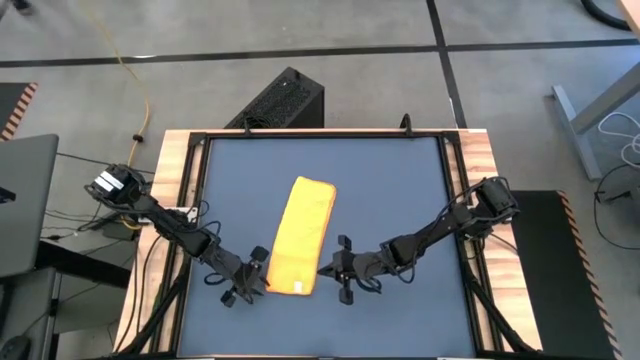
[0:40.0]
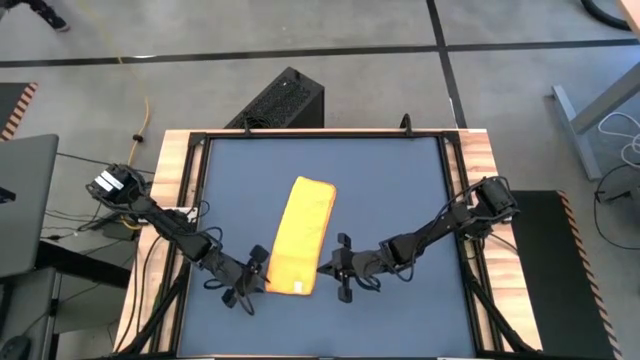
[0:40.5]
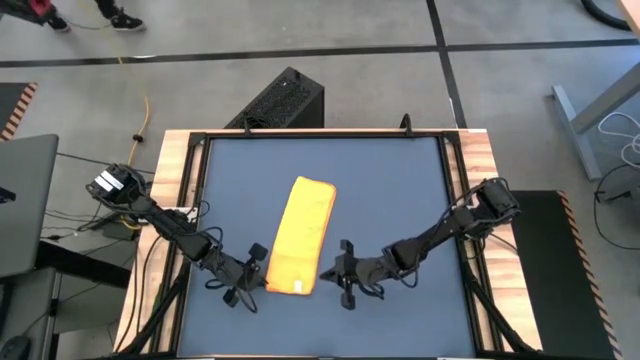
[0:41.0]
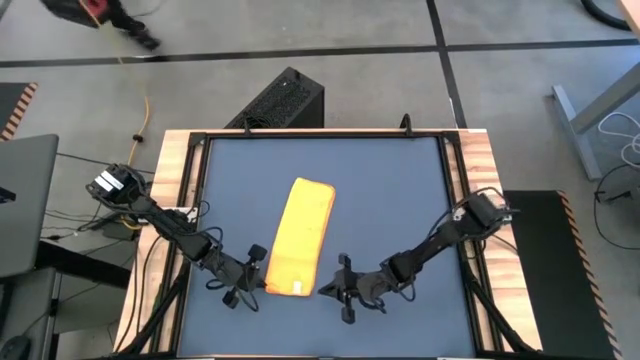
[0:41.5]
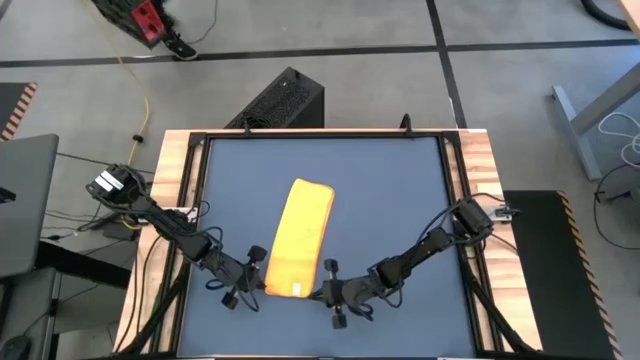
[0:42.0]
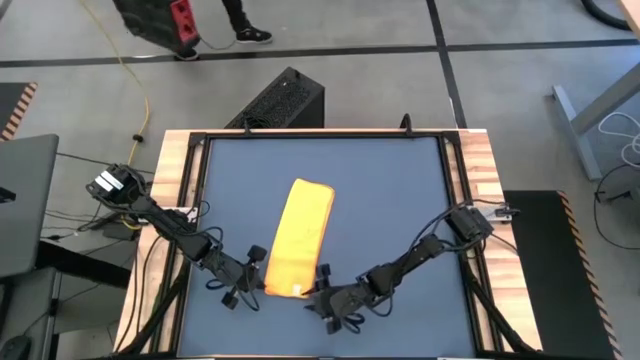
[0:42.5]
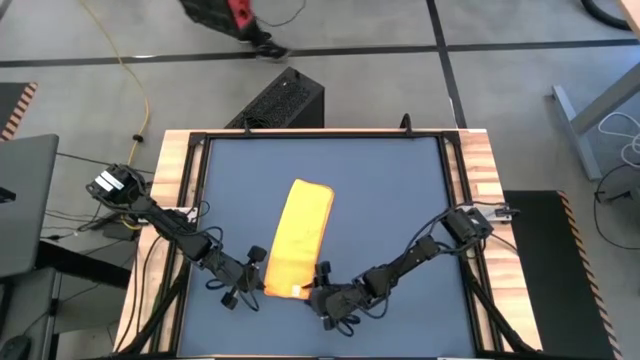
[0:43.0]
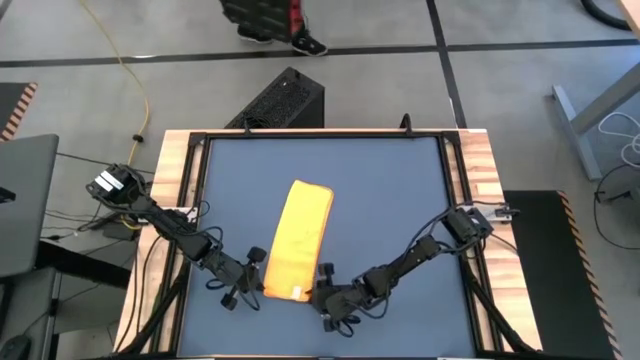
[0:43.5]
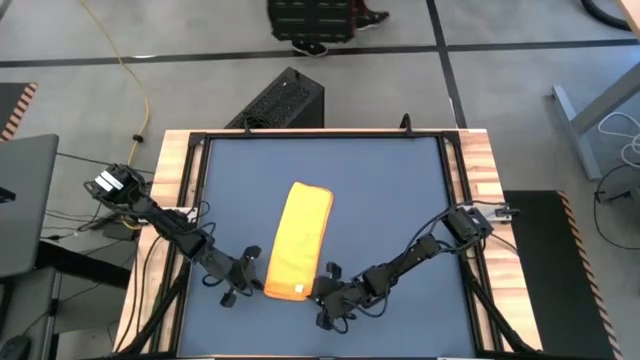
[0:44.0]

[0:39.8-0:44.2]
Task: Roll towel
Roll the orange microfiber towel

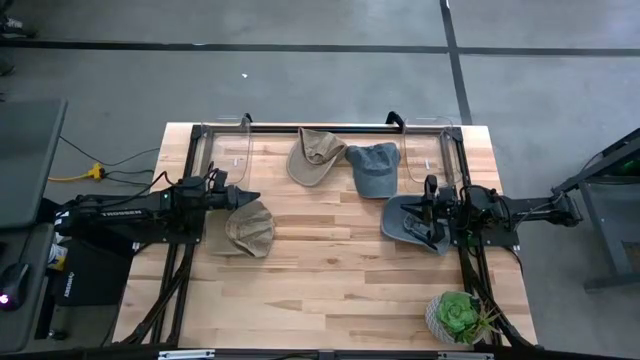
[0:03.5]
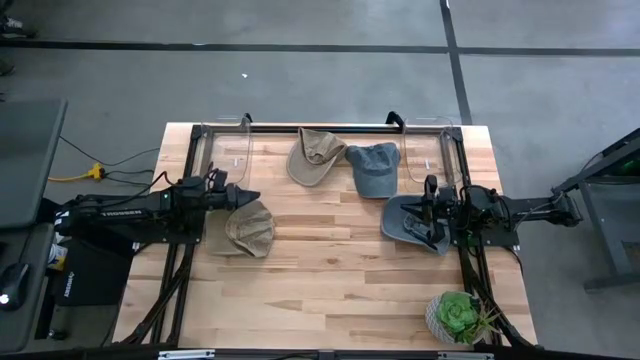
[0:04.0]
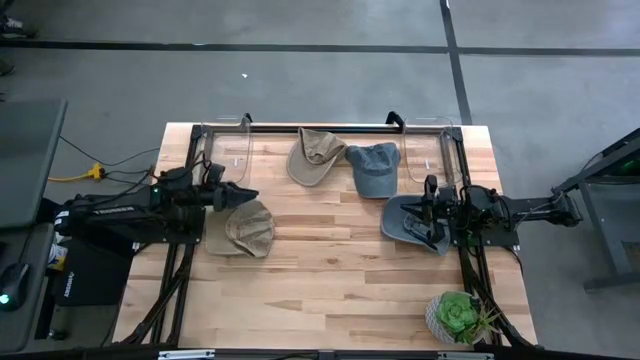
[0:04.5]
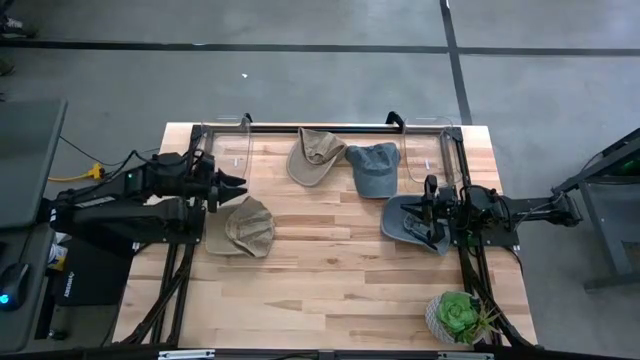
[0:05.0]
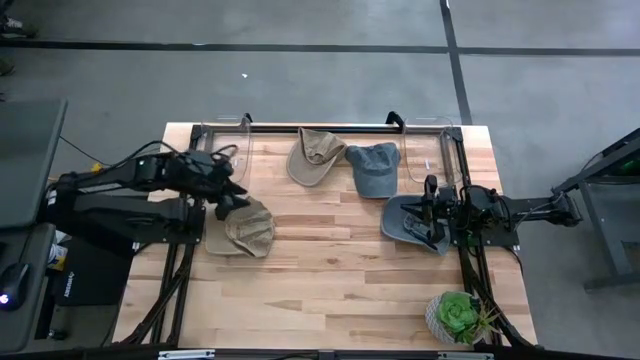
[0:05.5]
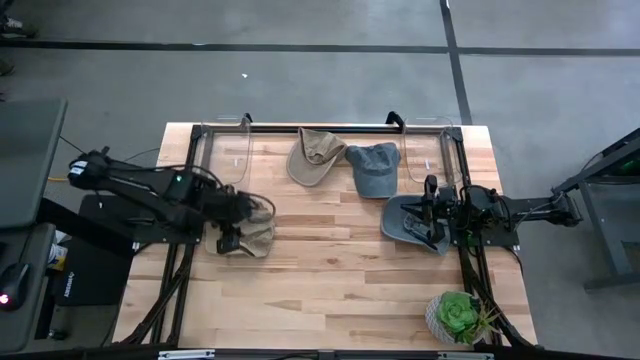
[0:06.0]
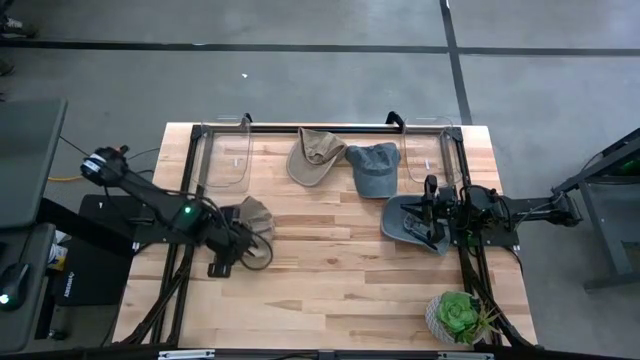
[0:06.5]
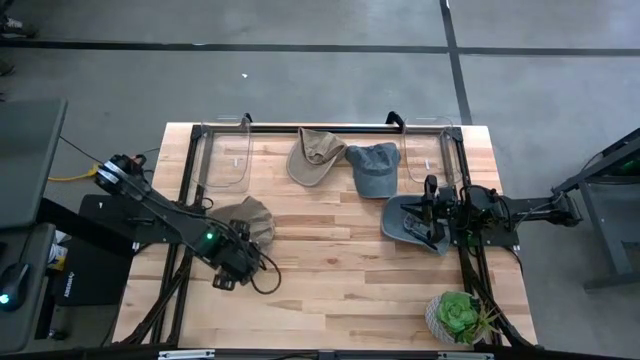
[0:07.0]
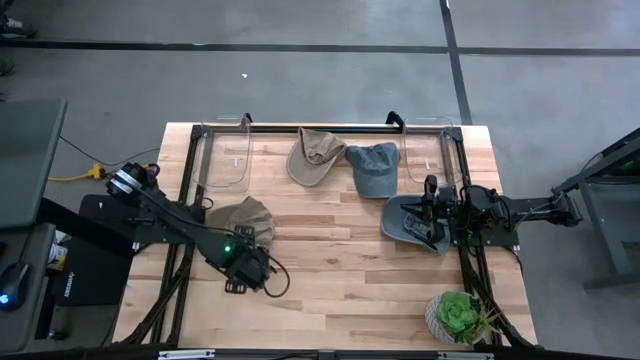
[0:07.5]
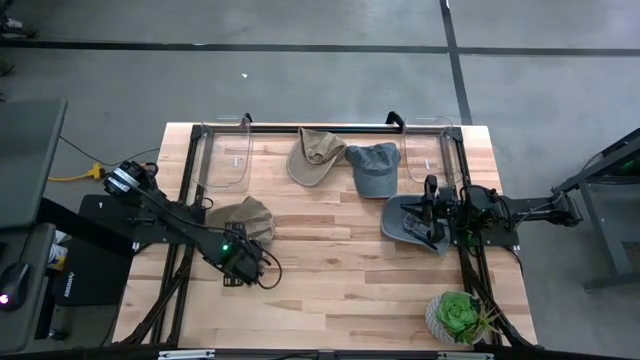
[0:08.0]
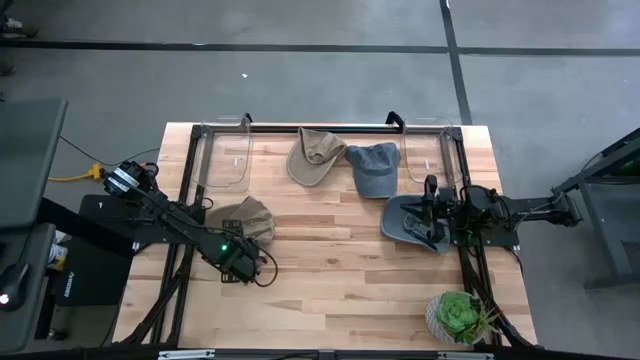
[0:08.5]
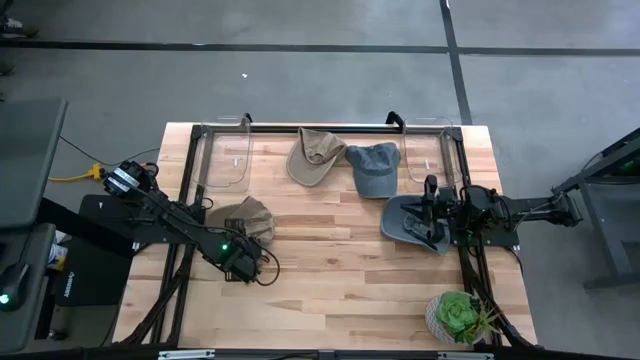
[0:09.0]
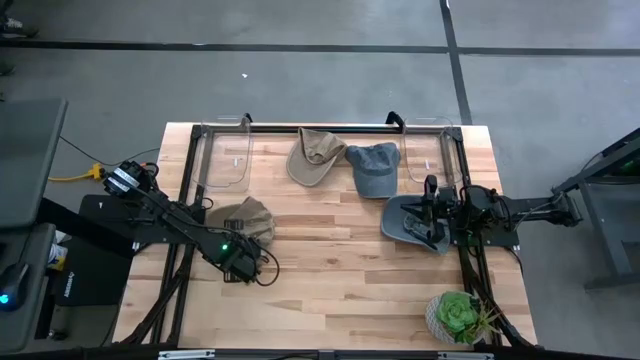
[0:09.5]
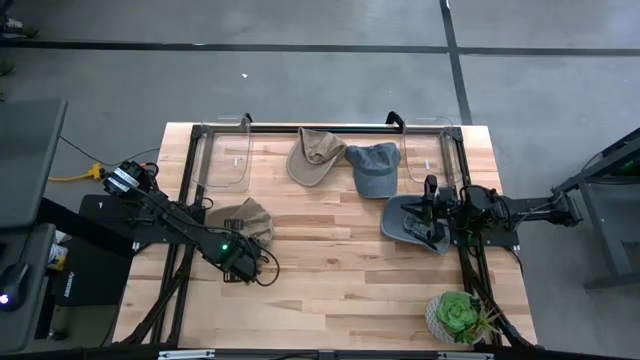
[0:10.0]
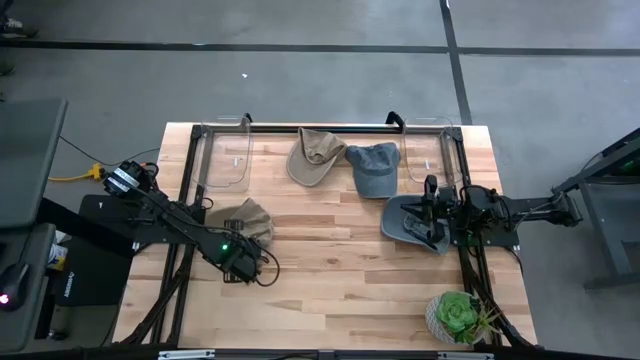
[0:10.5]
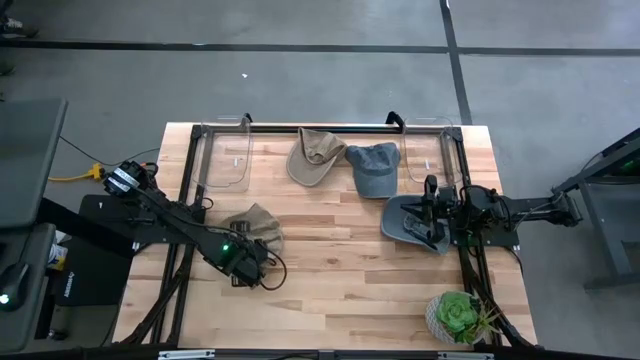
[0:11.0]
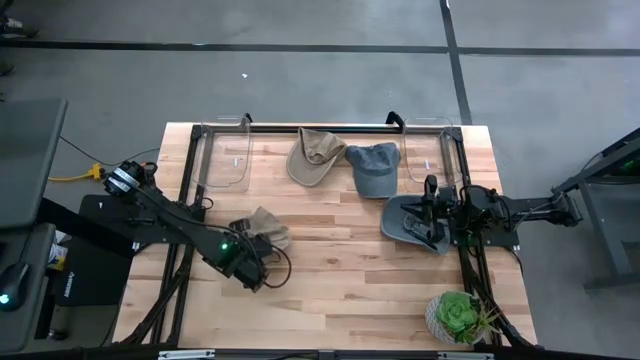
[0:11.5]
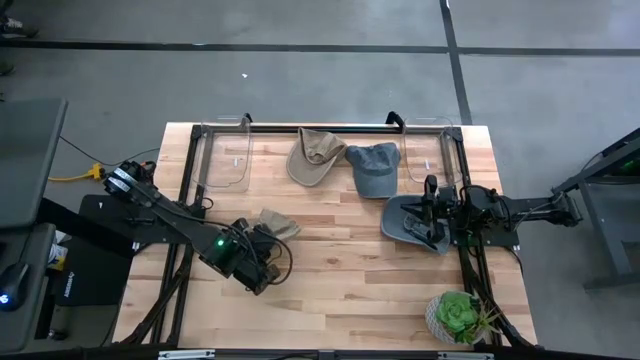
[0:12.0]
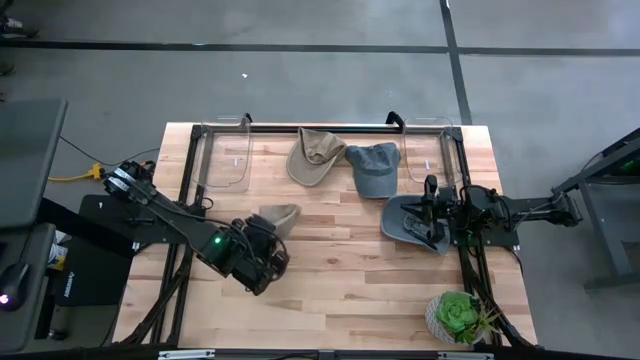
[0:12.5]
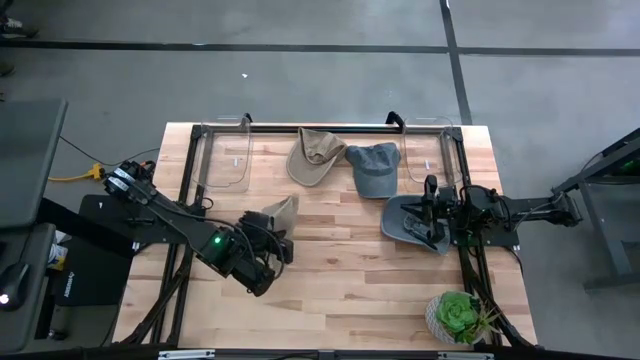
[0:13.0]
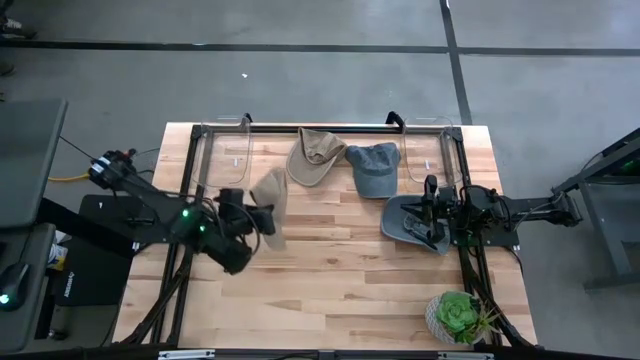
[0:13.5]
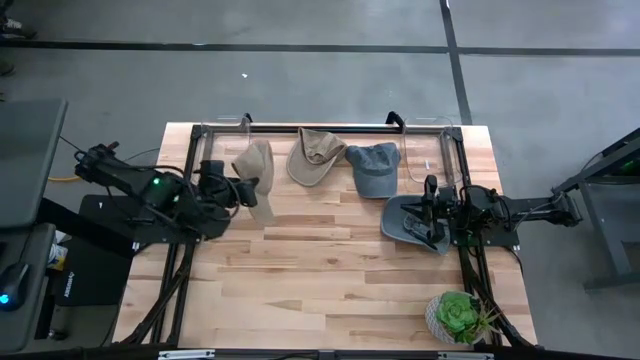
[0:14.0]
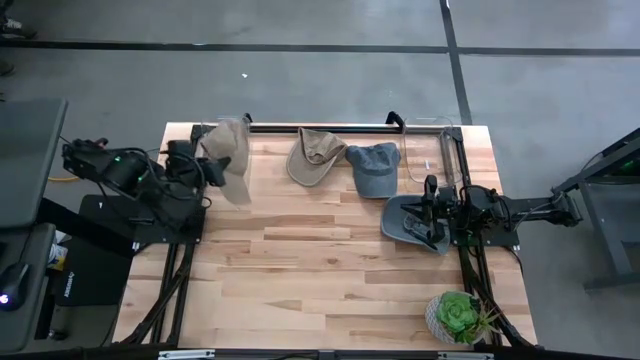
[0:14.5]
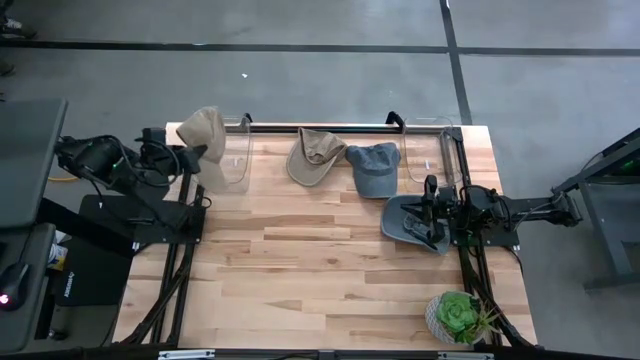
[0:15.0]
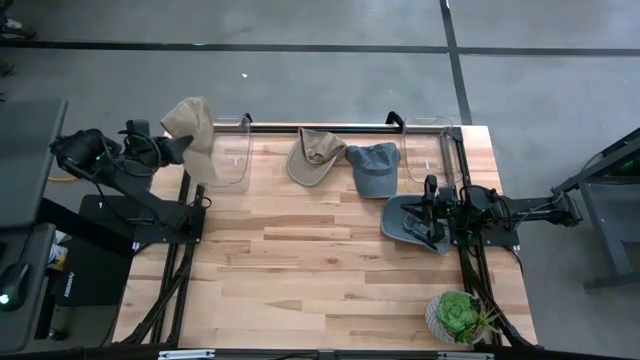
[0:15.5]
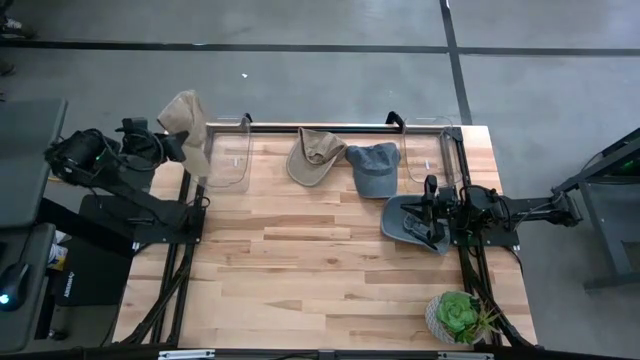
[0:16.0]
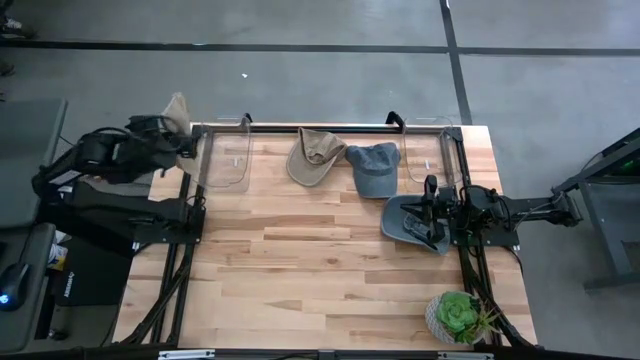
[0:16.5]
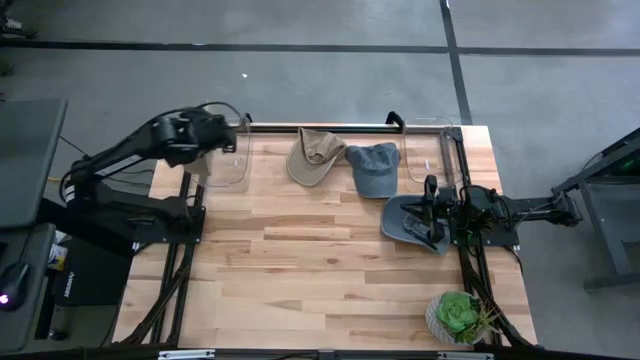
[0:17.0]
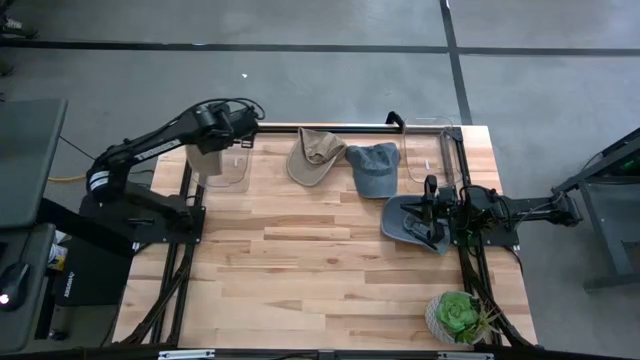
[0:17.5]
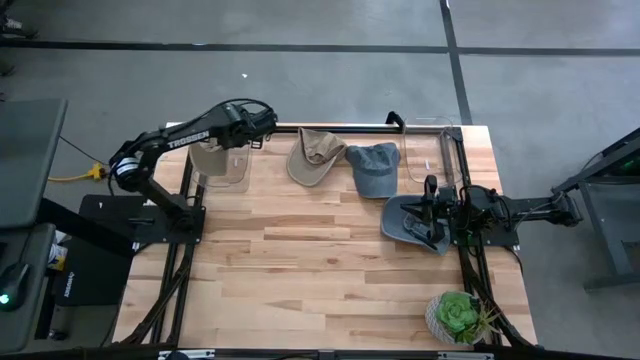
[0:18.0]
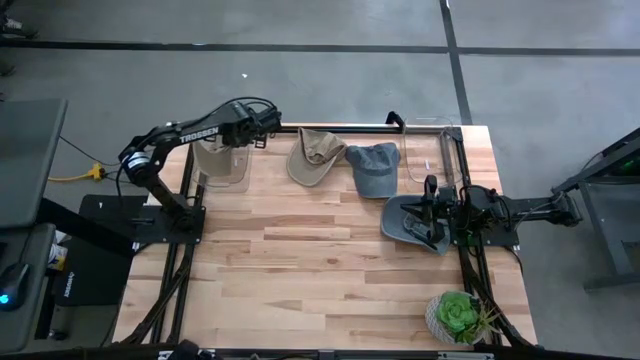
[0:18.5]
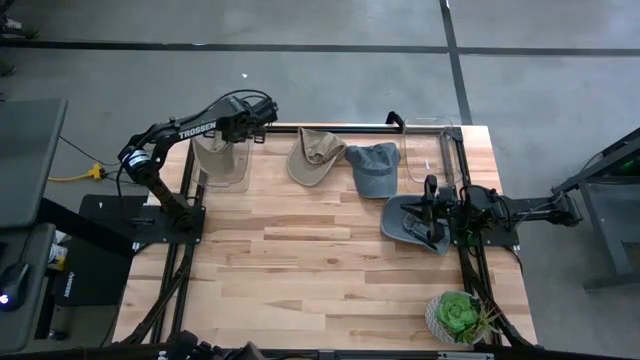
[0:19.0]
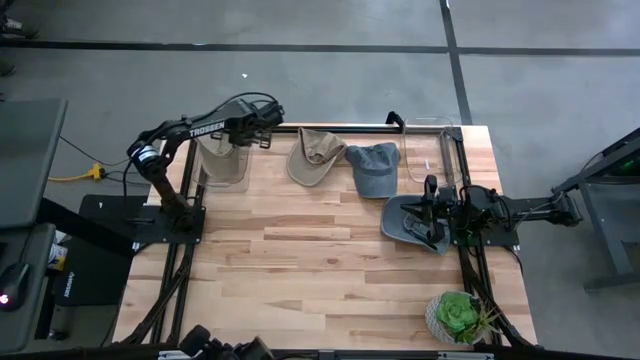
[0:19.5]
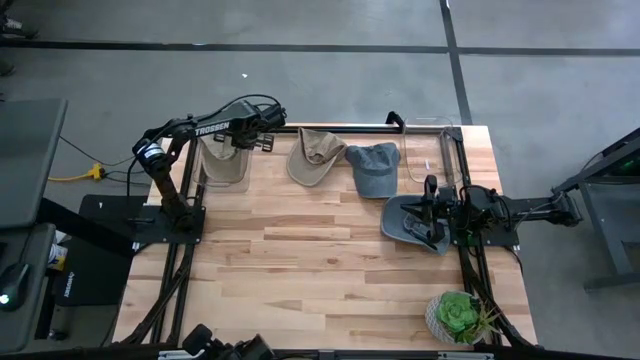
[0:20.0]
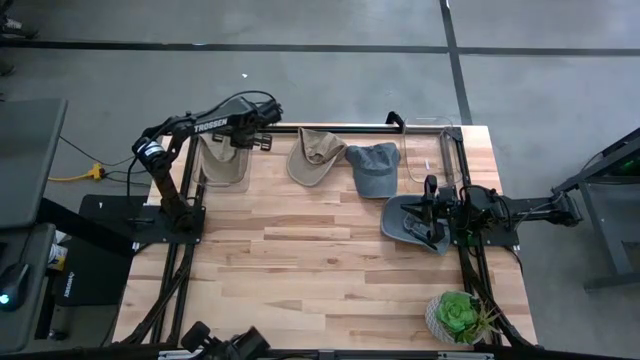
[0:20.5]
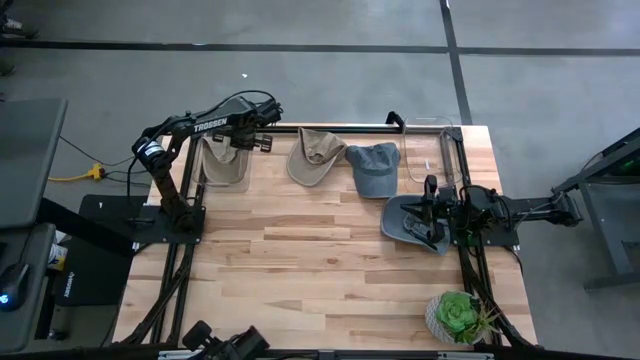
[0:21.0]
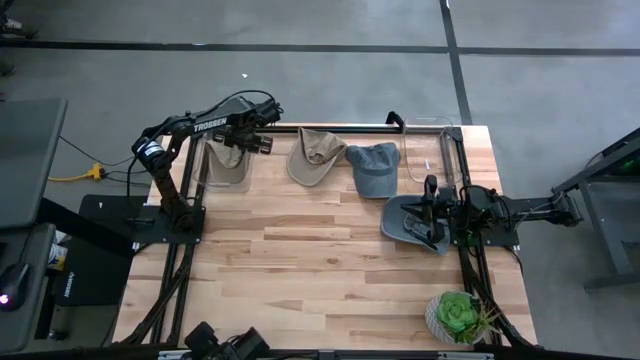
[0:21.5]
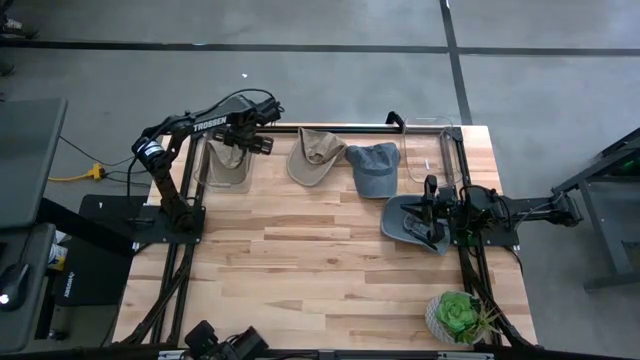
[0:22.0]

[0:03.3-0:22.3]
Task: Pick & Place hat
Put the bottom brown cap into the left transparent bin
